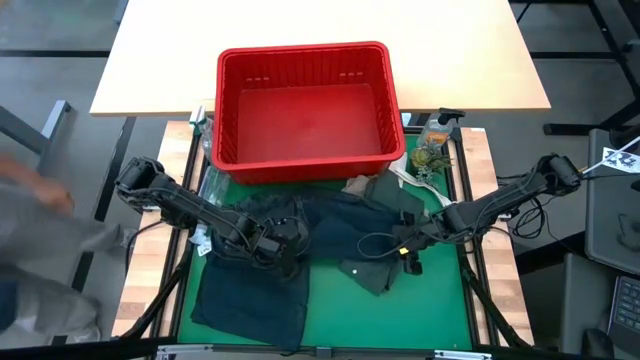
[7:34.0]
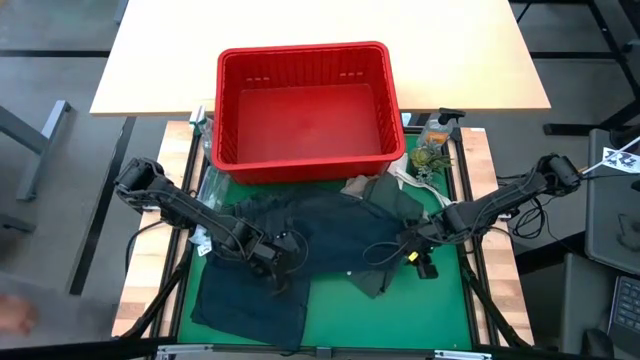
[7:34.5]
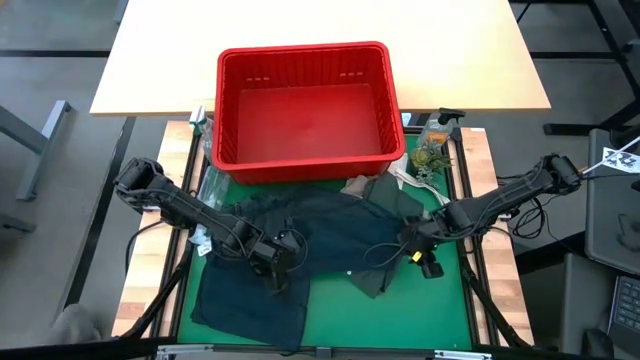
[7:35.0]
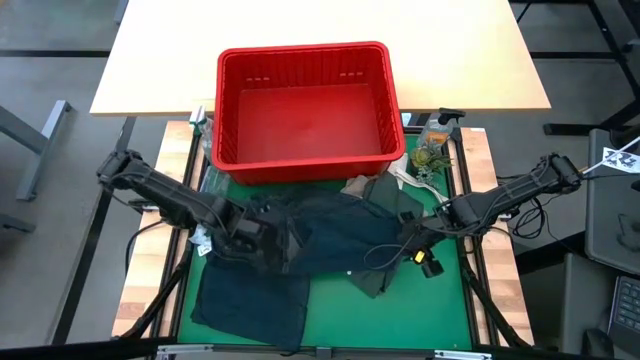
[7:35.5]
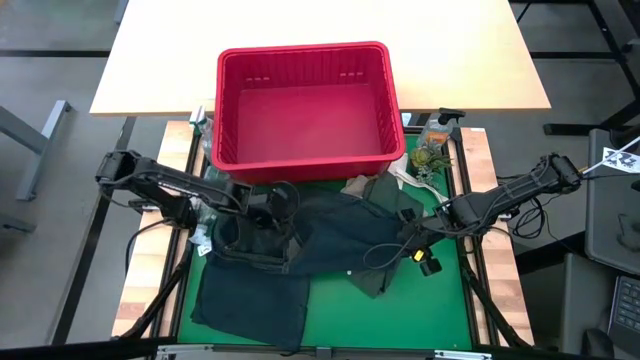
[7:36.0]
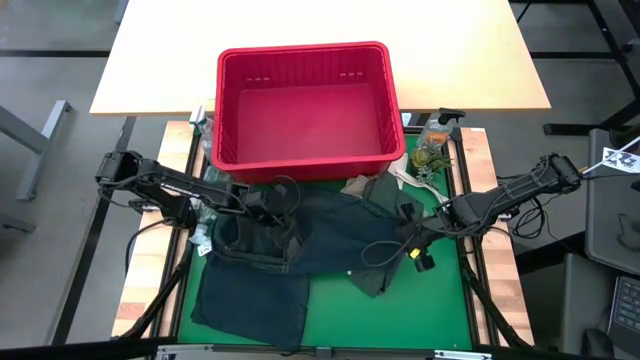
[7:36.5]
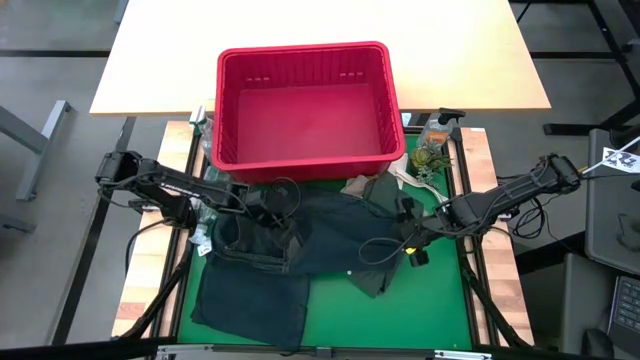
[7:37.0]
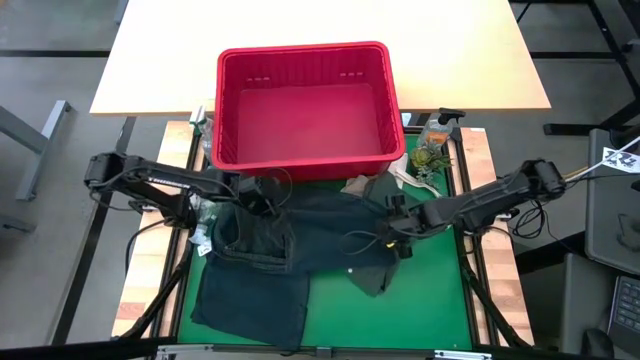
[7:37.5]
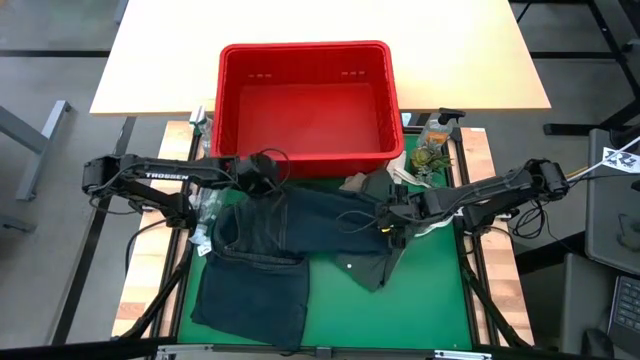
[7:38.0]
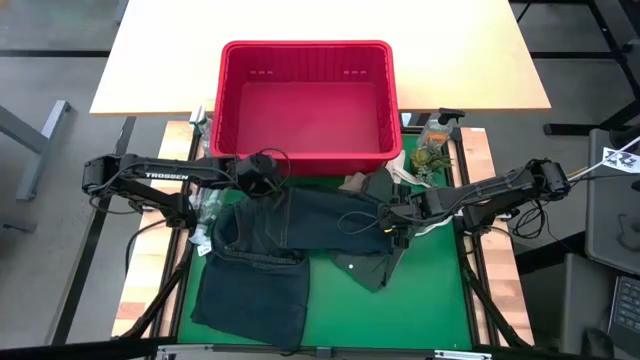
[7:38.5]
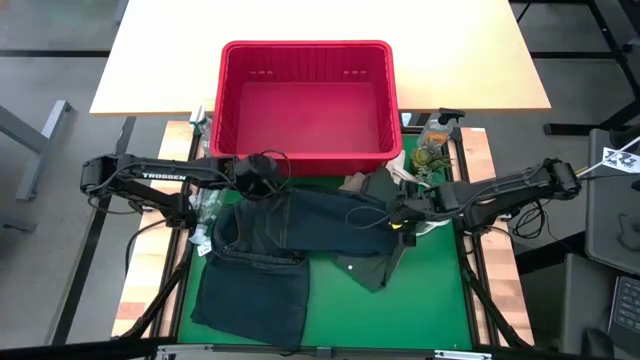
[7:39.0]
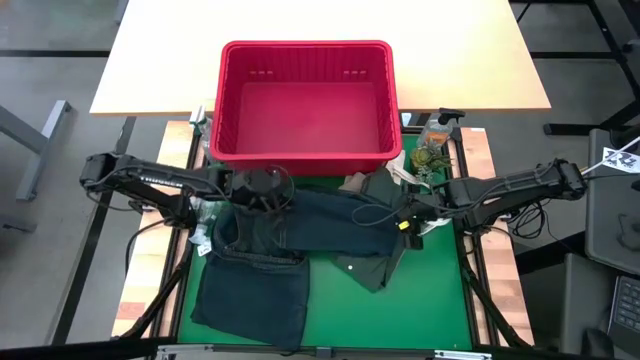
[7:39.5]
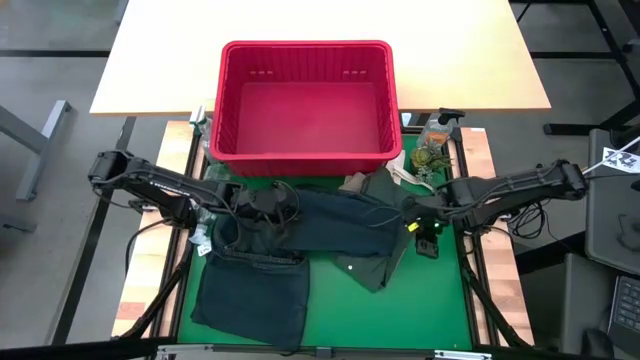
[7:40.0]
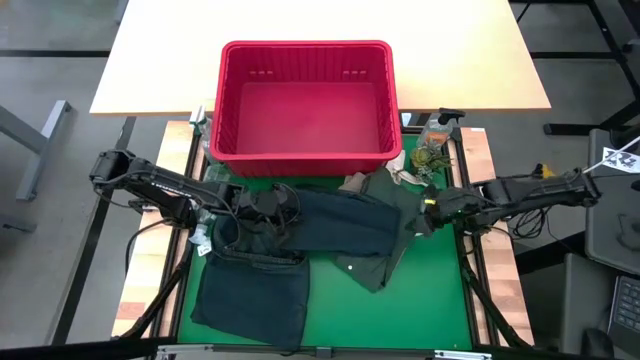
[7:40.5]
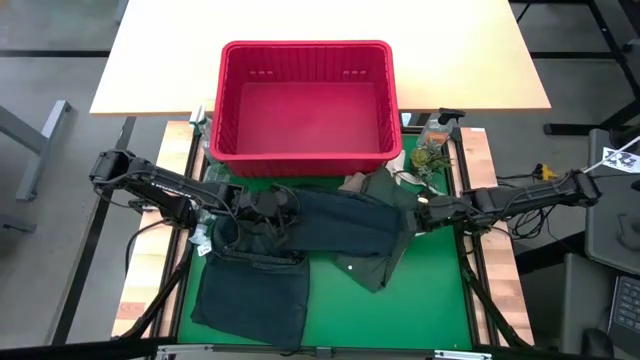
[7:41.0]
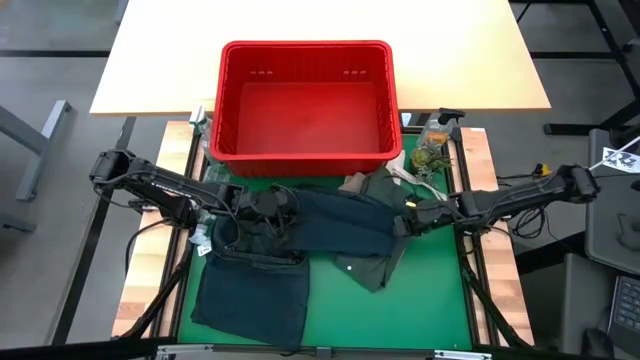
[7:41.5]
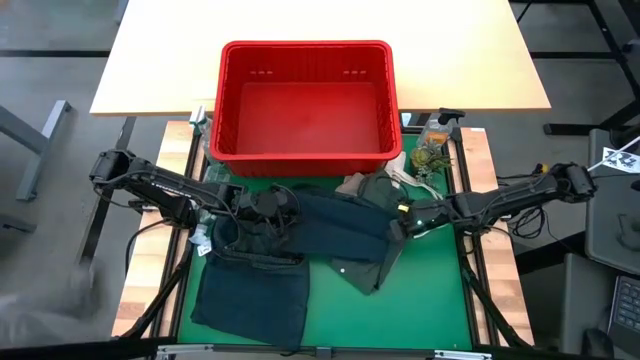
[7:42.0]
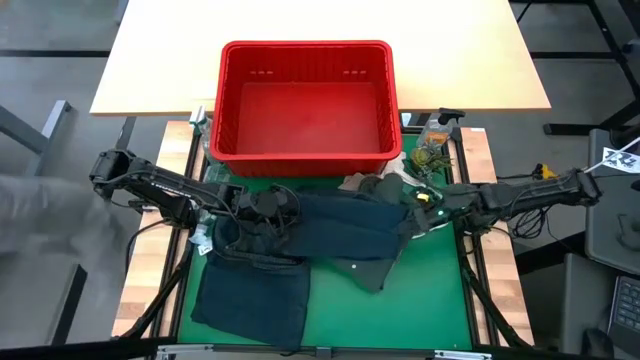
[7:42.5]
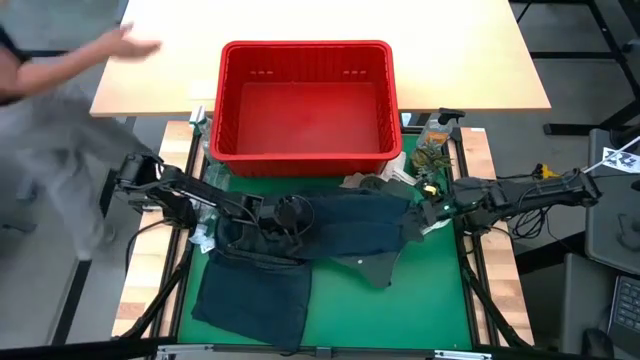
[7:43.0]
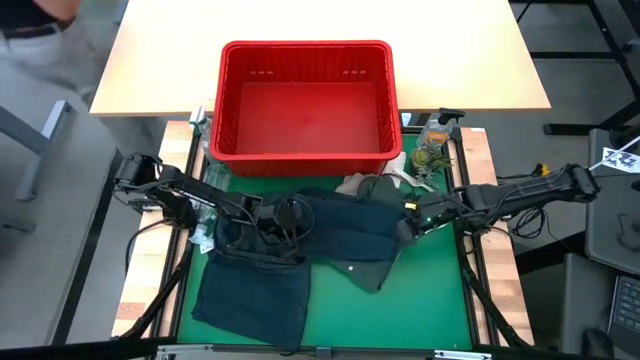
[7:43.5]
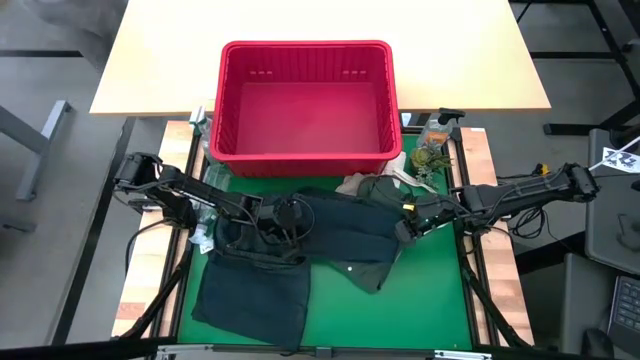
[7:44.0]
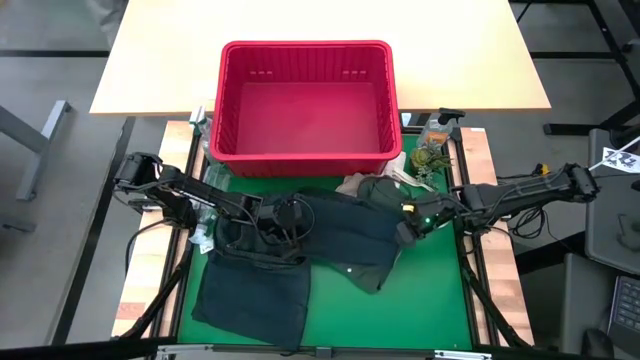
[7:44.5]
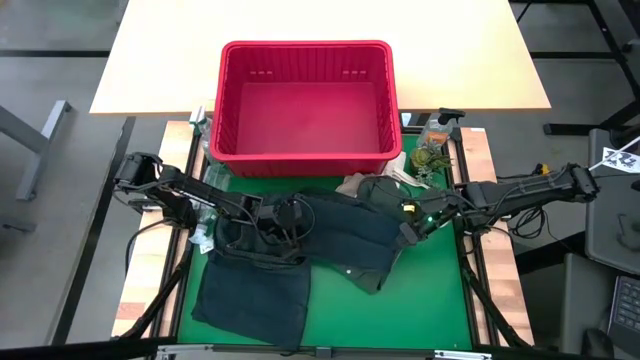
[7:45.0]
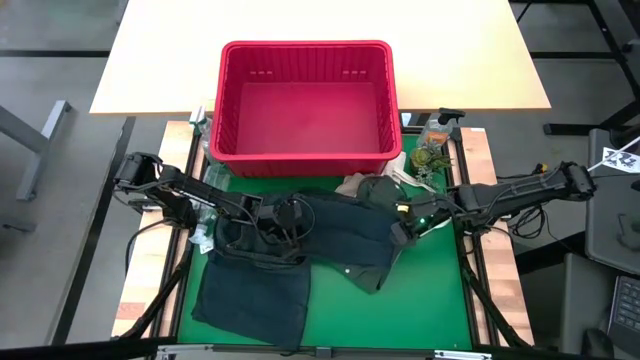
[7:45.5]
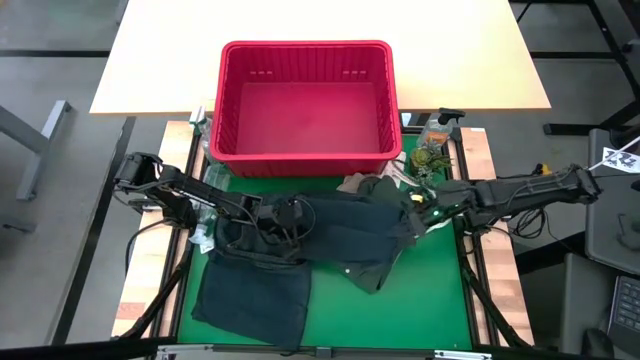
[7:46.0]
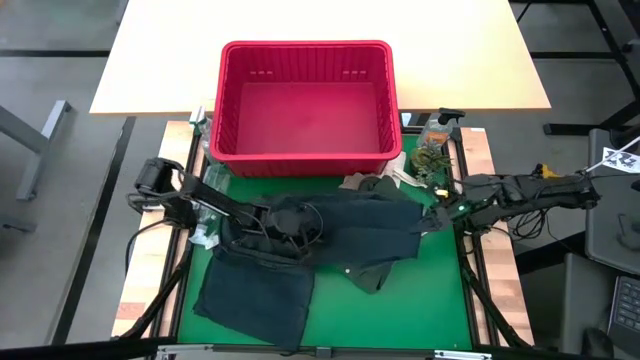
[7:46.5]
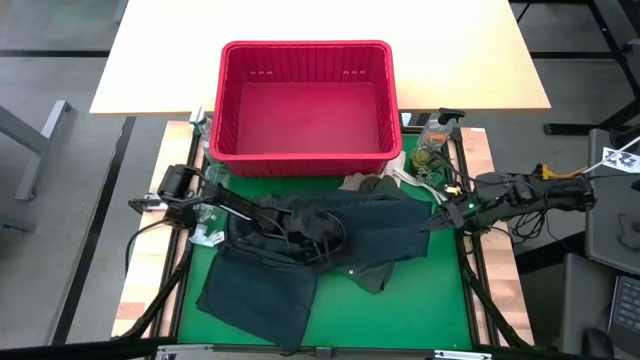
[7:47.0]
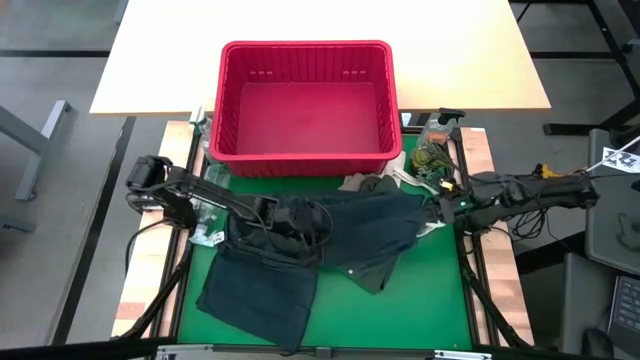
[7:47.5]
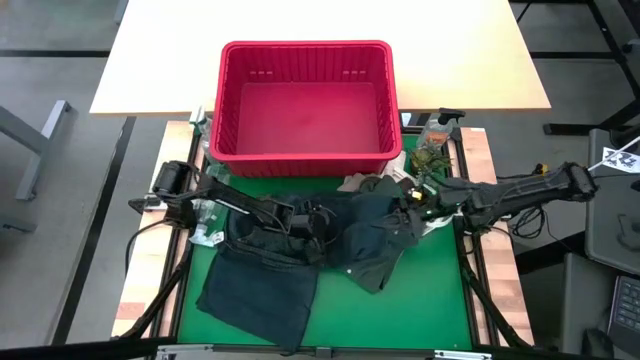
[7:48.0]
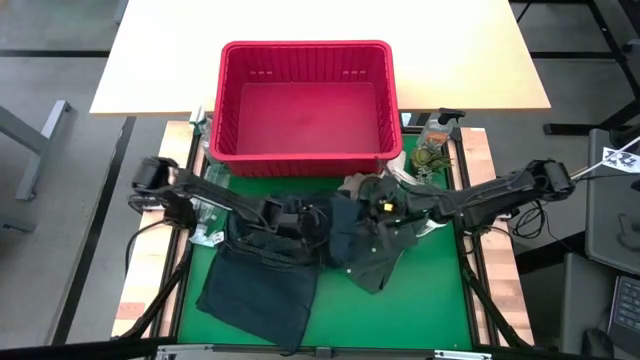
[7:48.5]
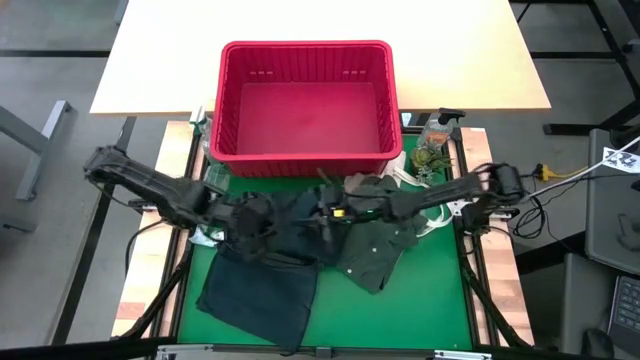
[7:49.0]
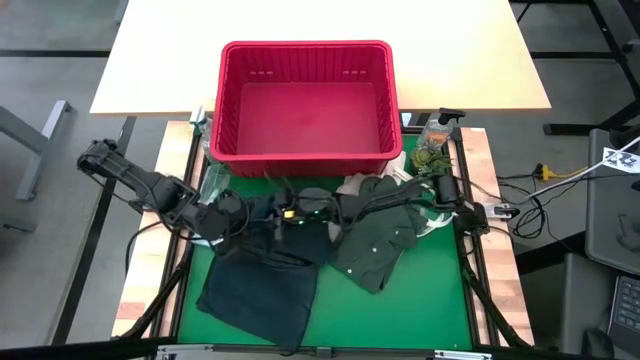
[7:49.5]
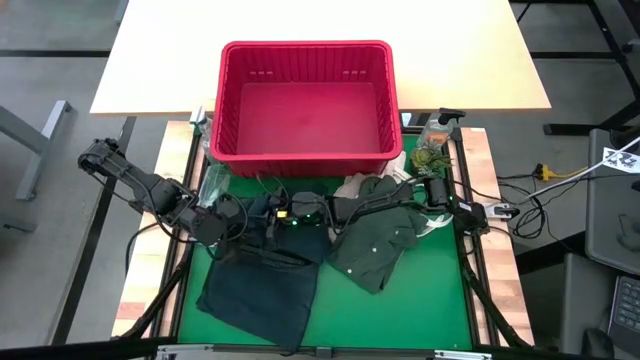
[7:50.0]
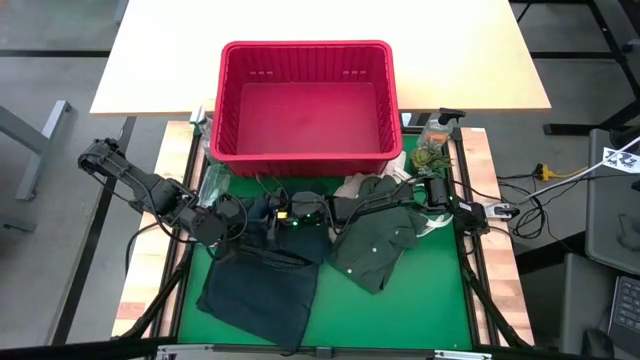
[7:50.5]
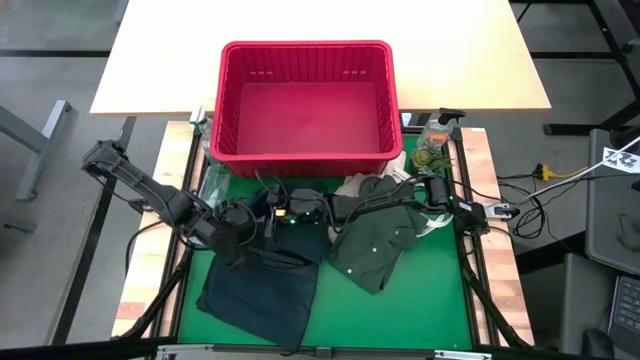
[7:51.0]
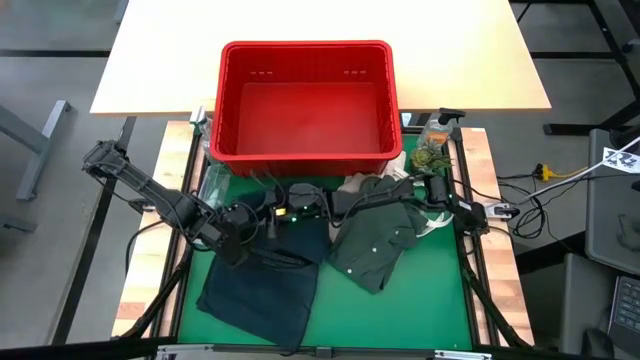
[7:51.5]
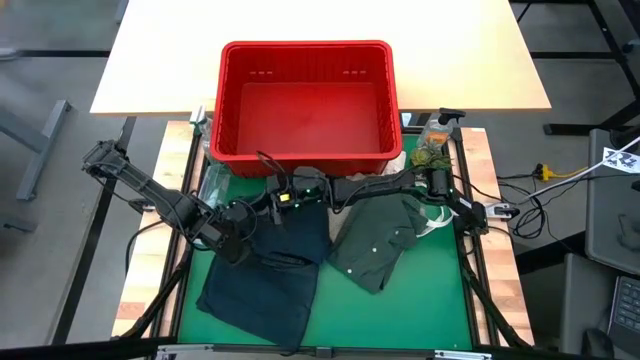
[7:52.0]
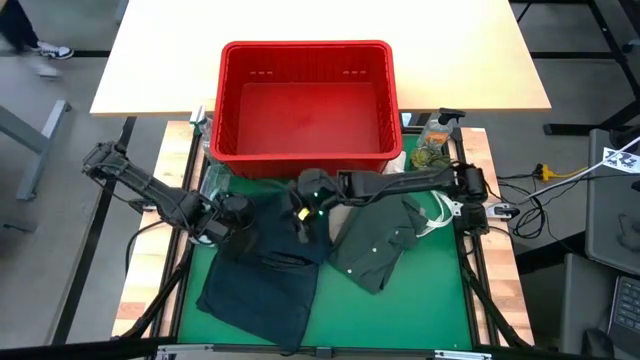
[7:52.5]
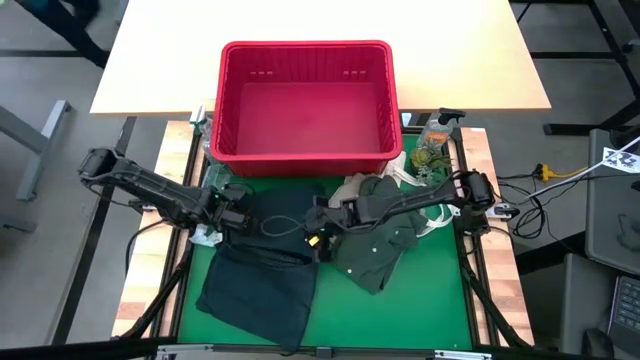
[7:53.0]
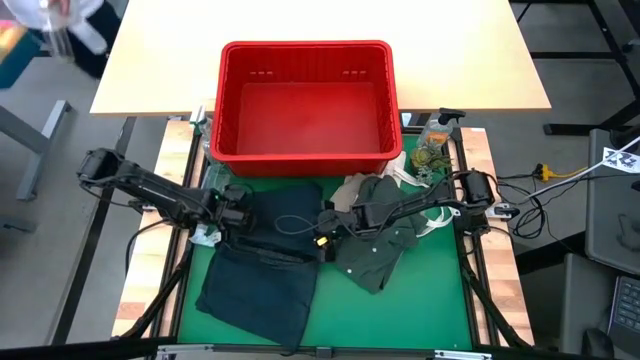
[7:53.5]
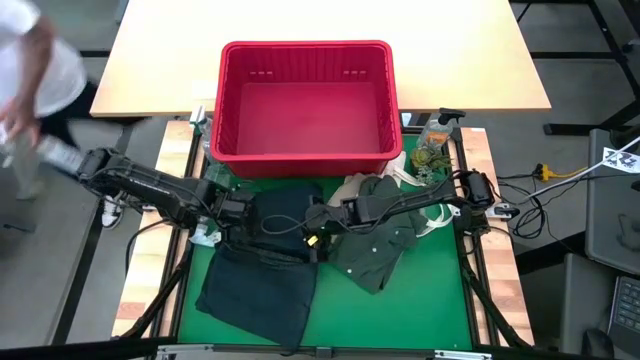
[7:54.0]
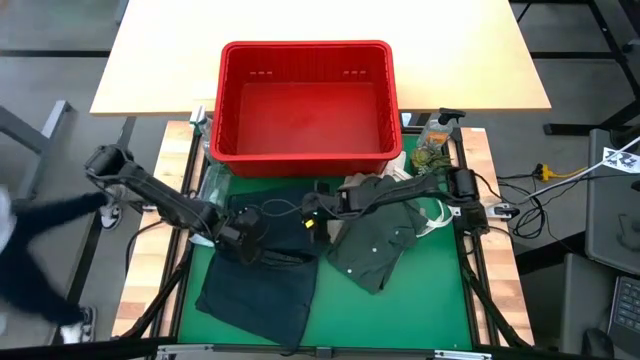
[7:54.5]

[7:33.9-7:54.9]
Task: Fold laundry
Fold the dark blue pants
